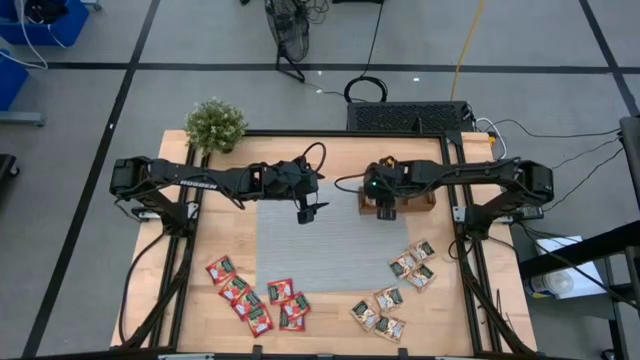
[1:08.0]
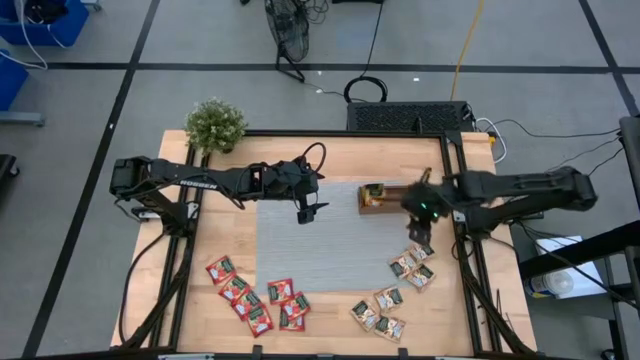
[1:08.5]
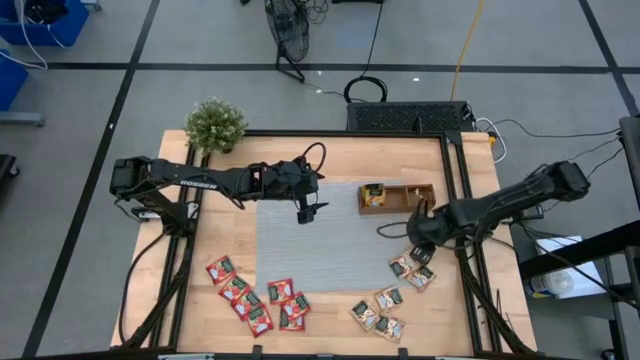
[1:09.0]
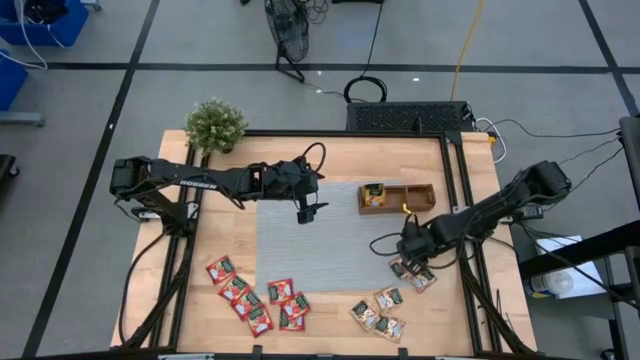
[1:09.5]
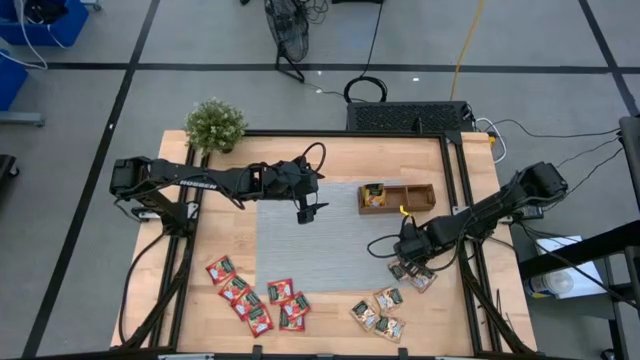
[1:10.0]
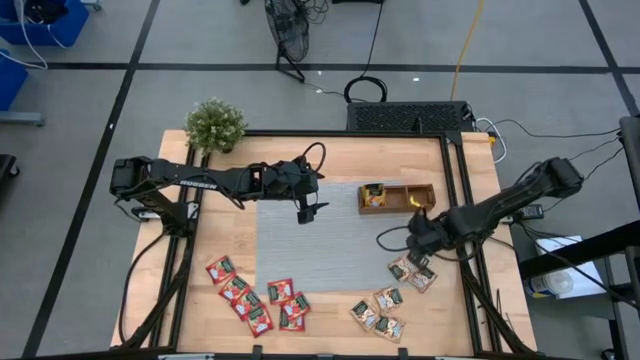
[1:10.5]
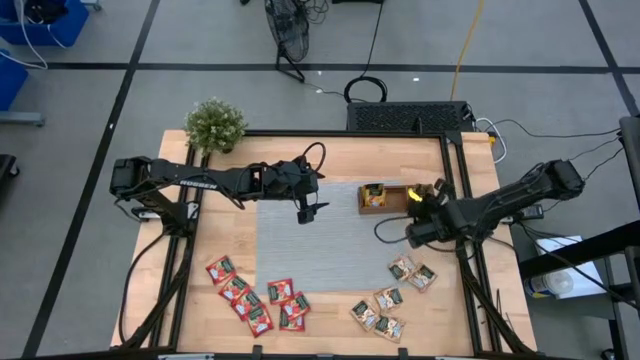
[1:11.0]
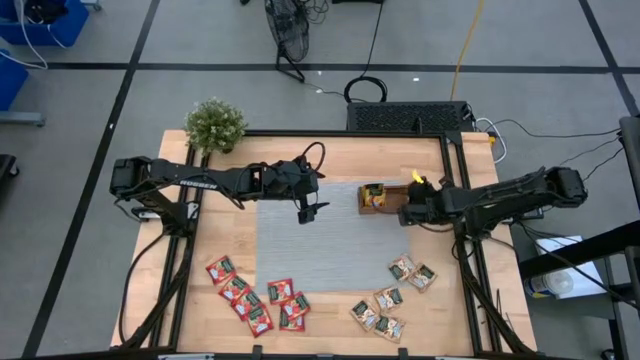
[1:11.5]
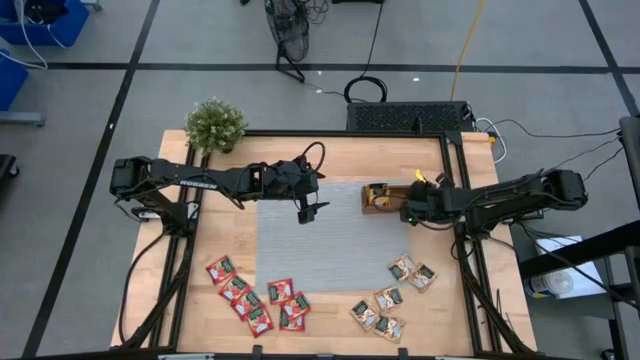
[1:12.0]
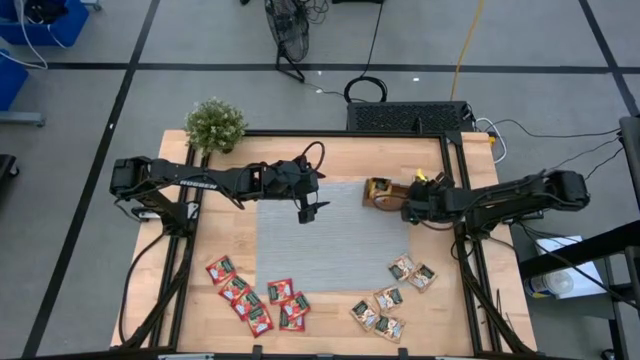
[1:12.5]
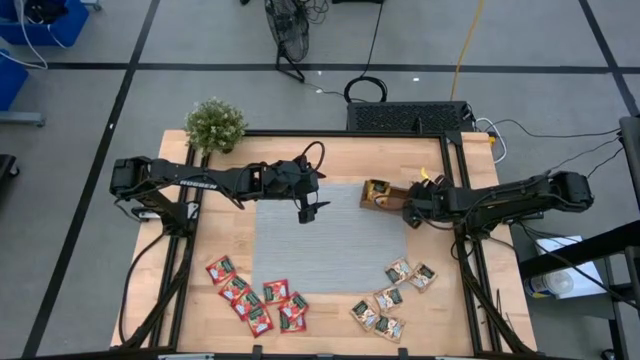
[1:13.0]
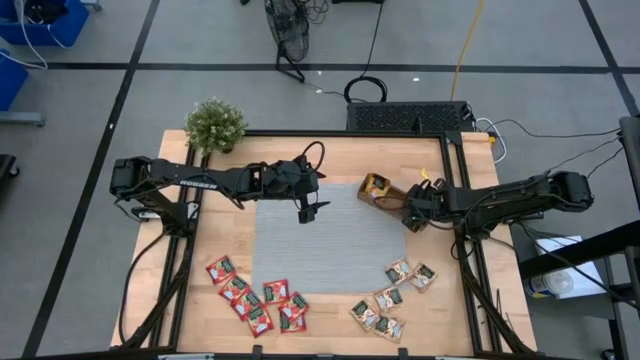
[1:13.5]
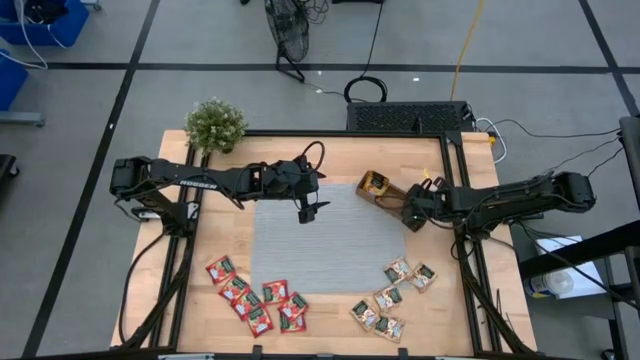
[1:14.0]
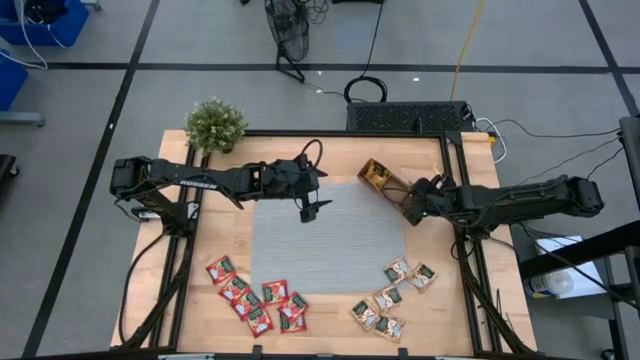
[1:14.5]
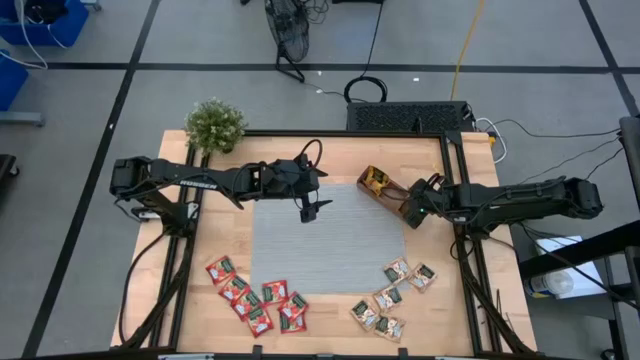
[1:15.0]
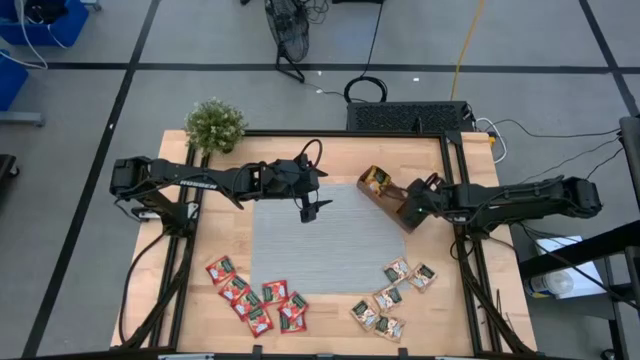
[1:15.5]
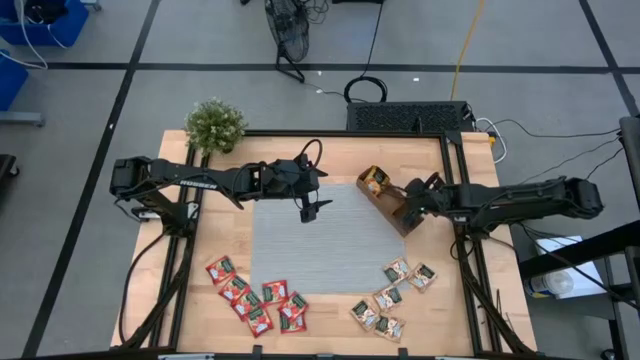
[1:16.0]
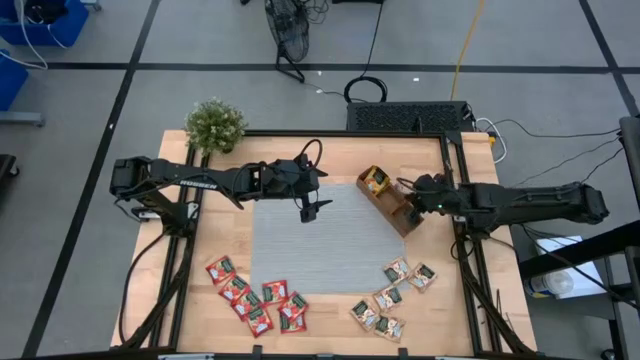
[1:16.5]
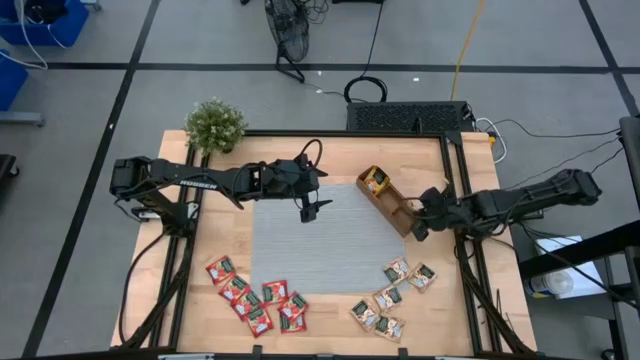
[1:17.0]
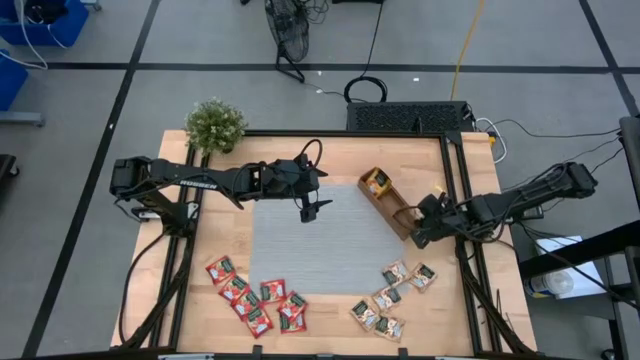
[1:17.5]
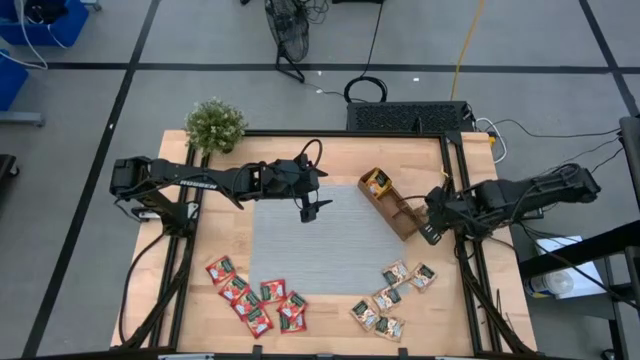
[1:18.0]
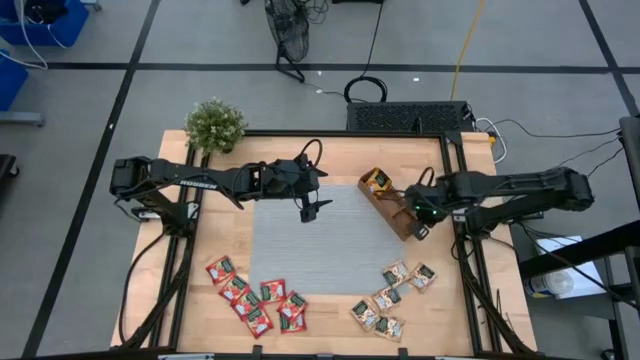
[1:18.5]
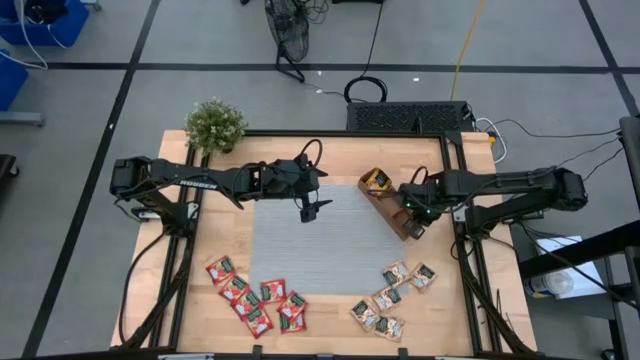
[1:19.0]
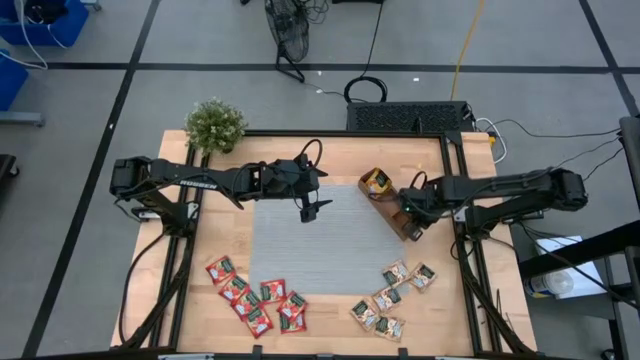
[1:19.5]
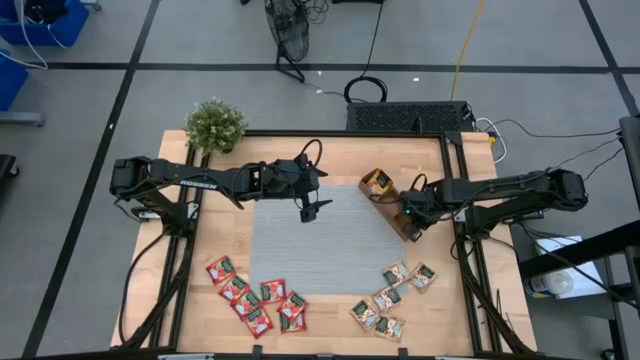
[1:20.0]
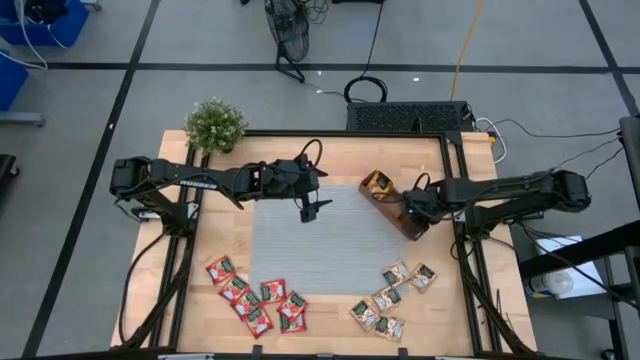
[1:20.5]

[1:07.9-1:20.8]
Task: Pick & Place Tea
Put the brown tea bag into the right section of the wooden organizer

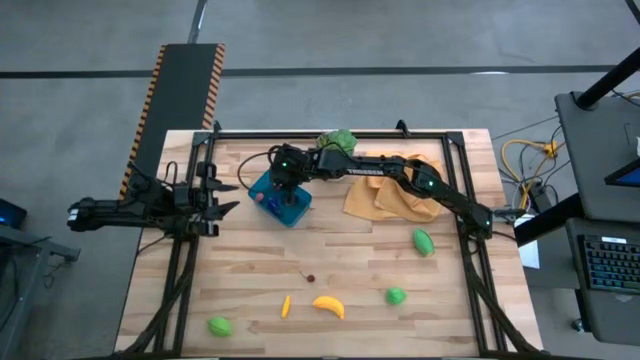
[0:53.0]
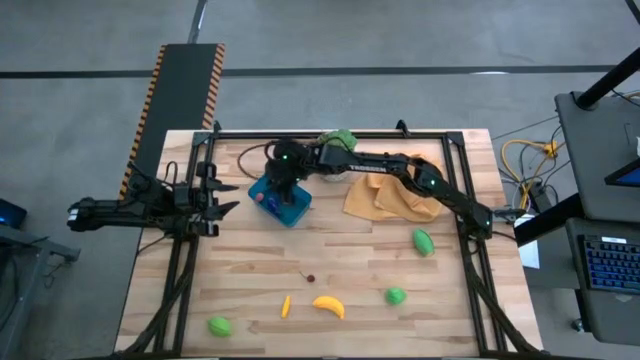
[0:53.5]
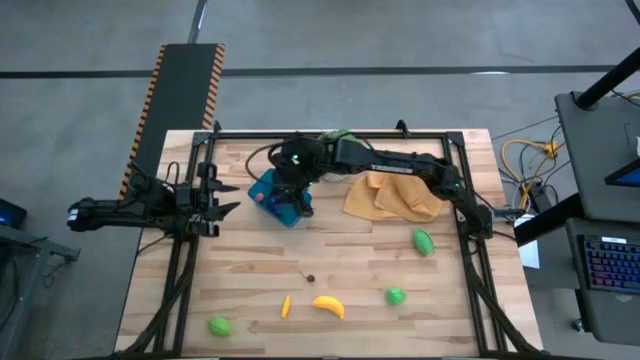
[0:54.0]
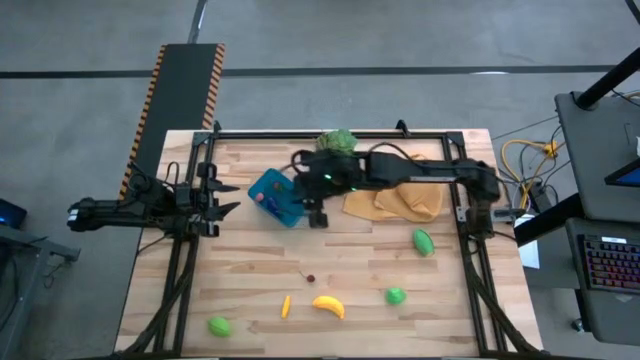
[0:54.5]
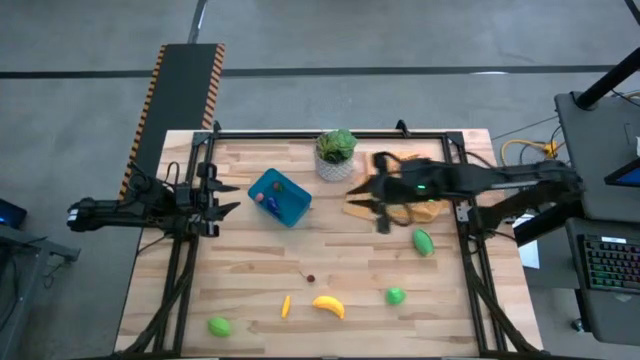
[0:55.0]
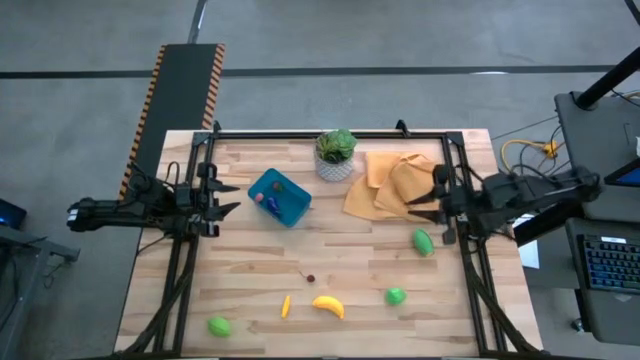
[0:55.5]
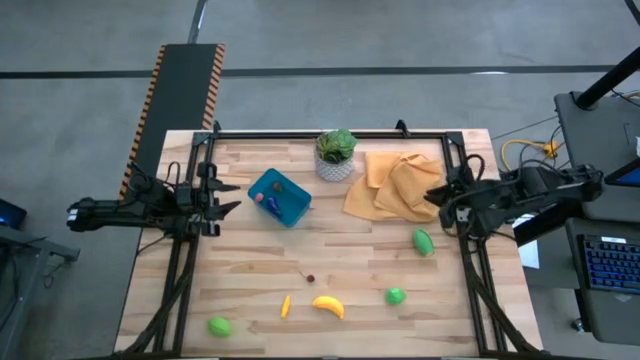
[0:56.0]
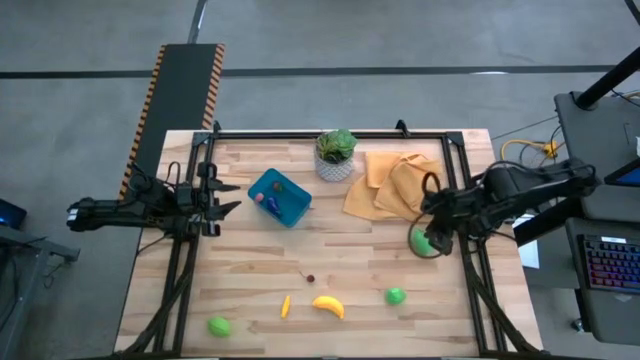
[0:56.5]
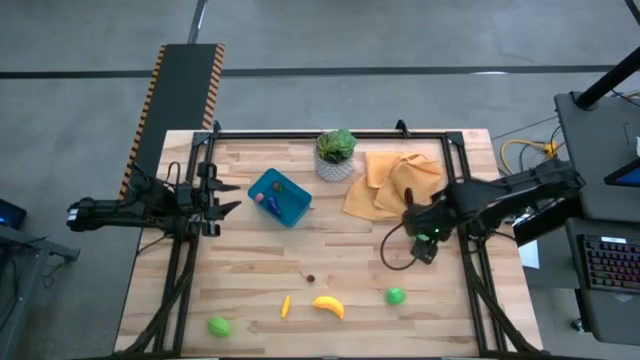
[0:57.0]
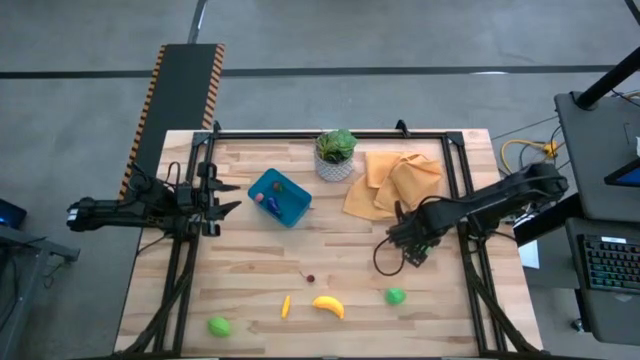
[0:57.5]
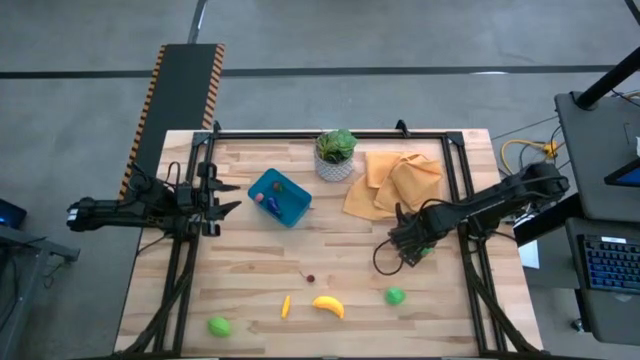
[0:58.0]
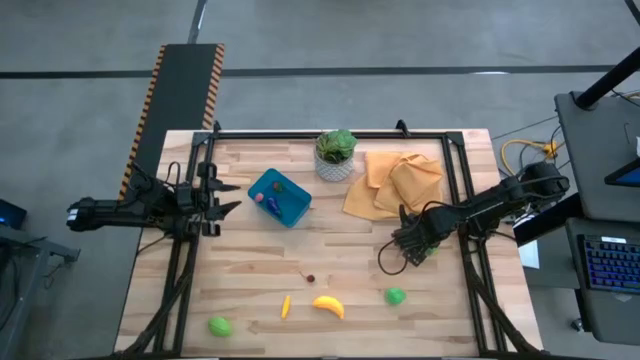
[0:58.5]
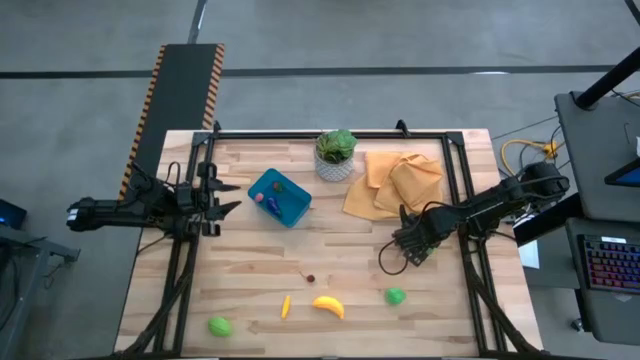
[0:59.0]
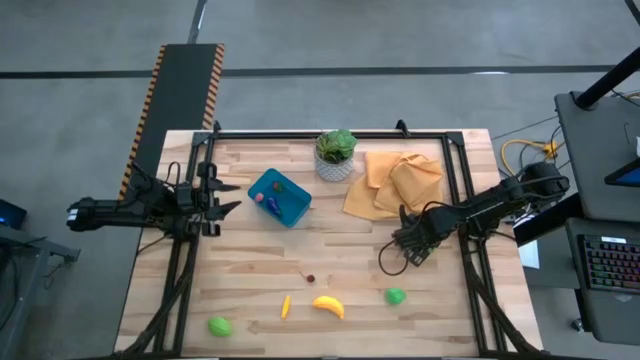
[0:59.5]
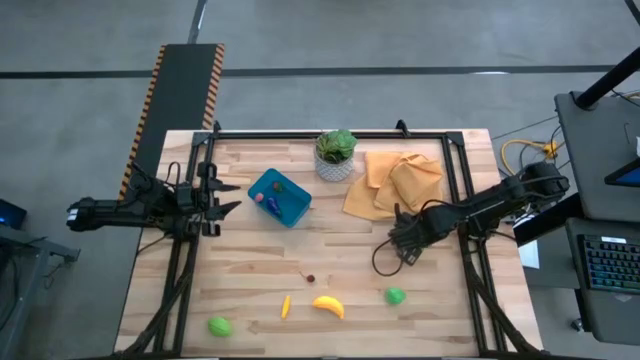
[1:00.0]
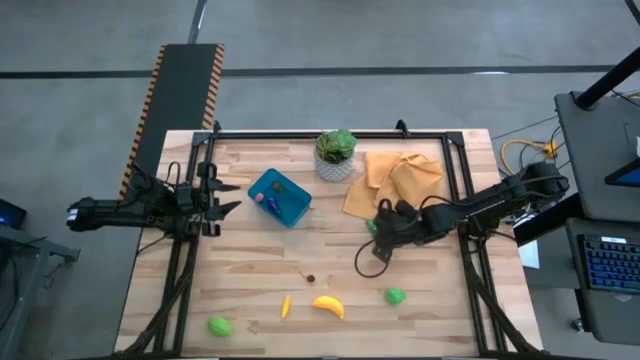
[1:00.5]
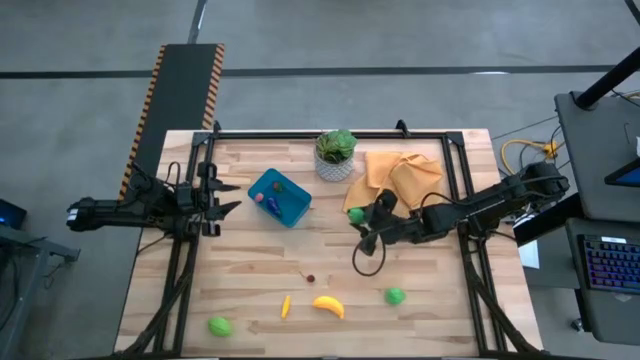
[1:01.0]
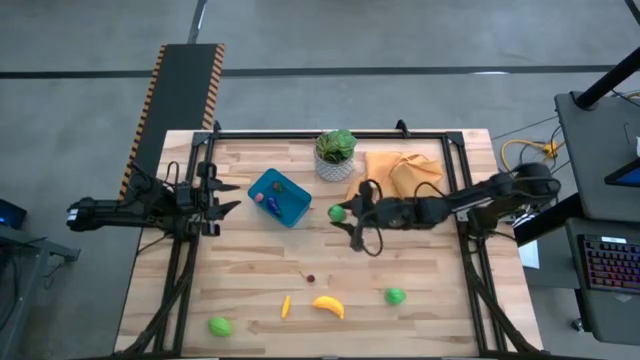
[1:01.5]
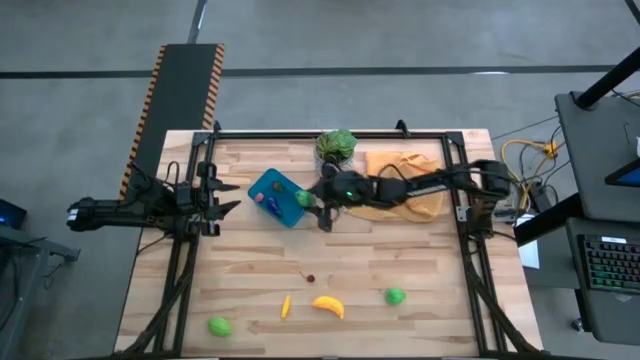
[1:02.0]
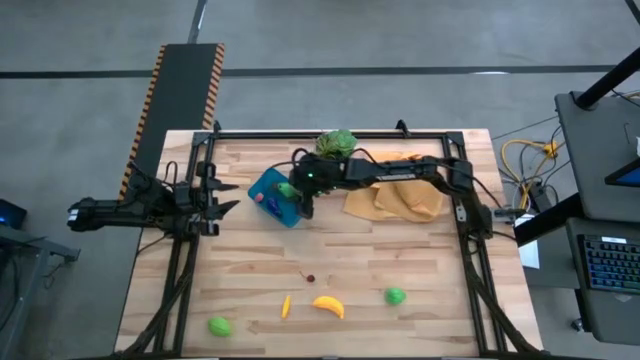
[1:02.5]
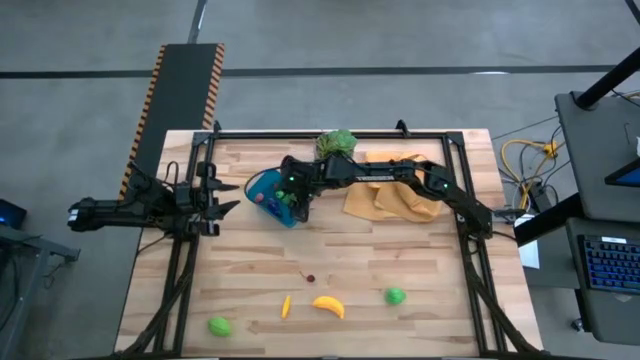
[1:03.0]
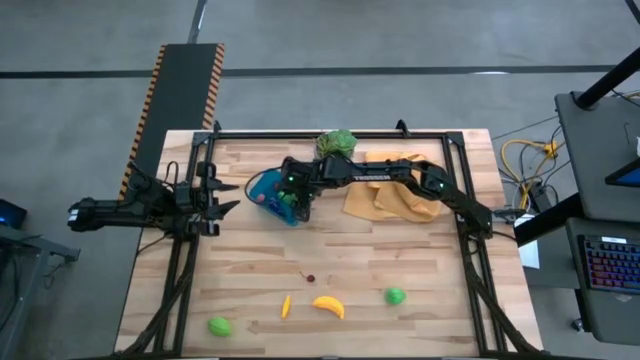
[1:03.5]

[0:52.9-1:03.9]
Task: Pick and placing Produce into tupperware
Put the green corn into the blue bin
